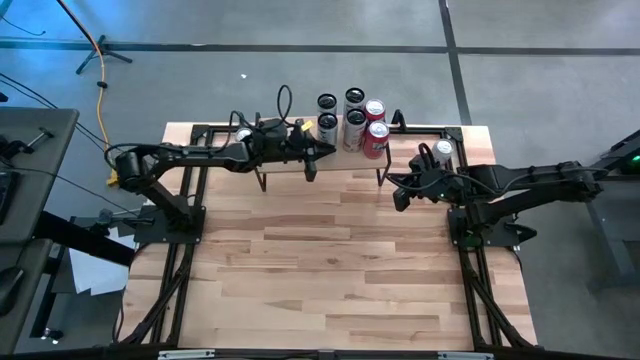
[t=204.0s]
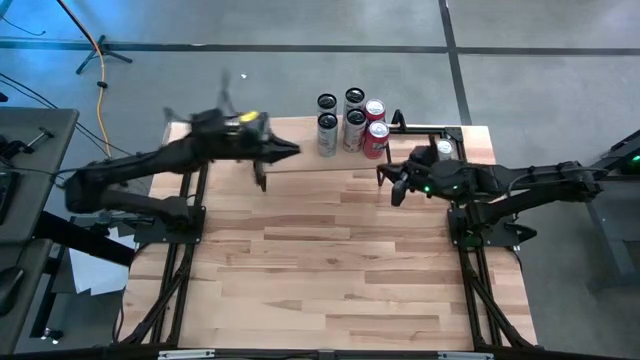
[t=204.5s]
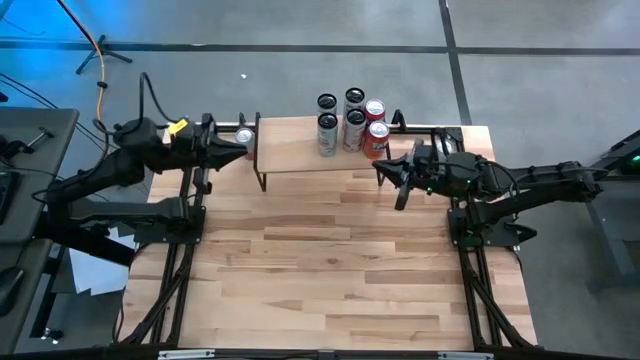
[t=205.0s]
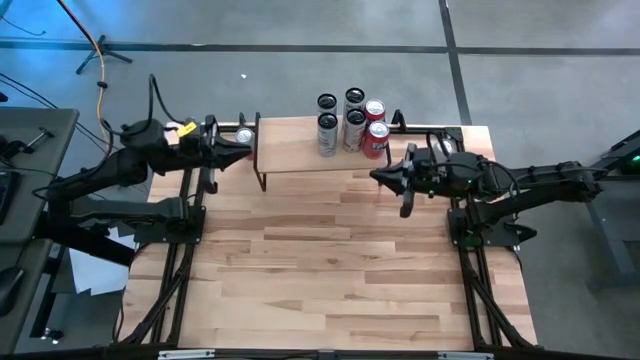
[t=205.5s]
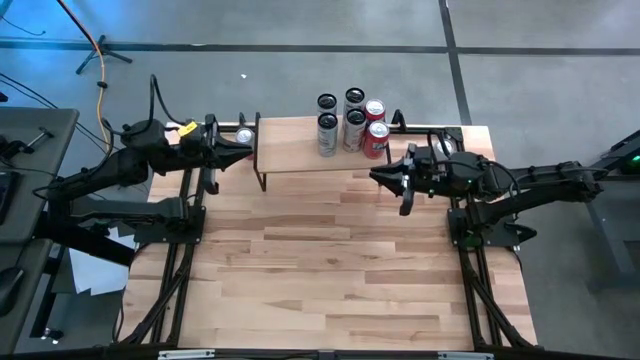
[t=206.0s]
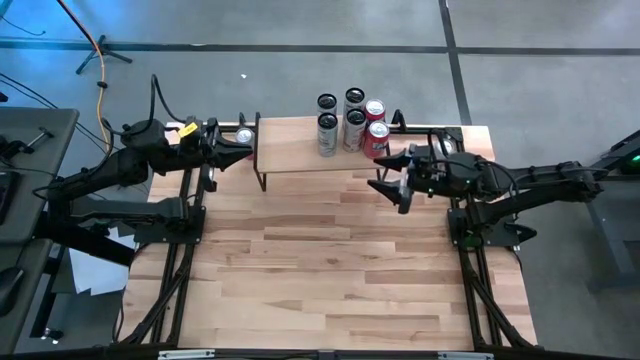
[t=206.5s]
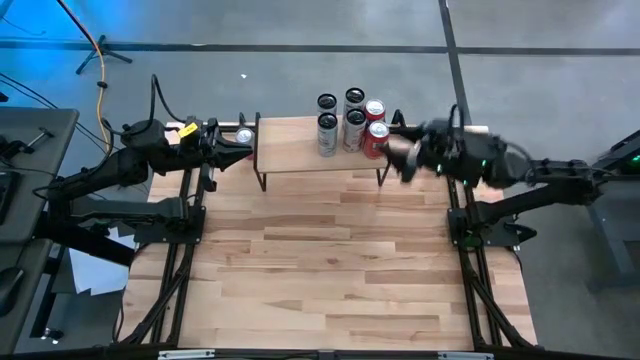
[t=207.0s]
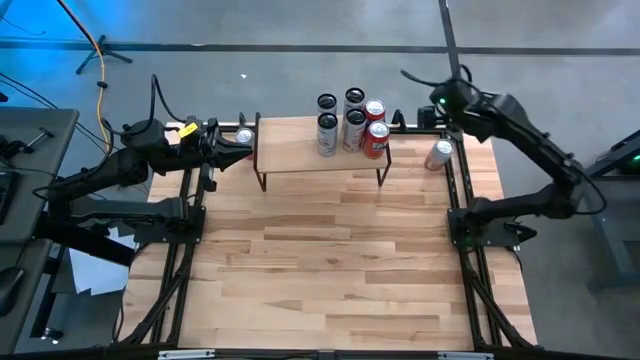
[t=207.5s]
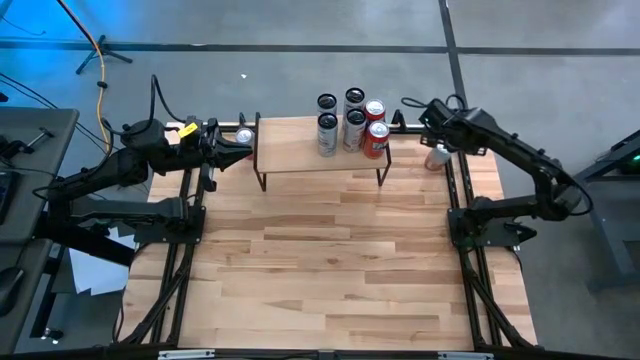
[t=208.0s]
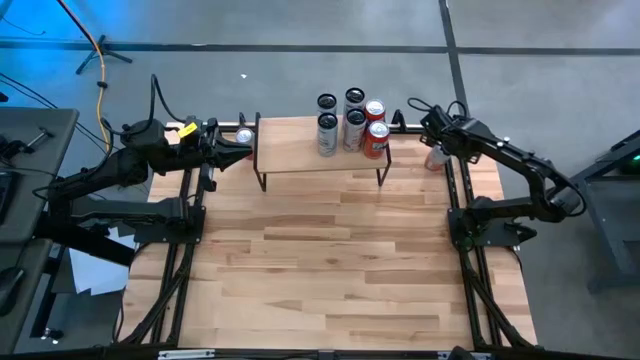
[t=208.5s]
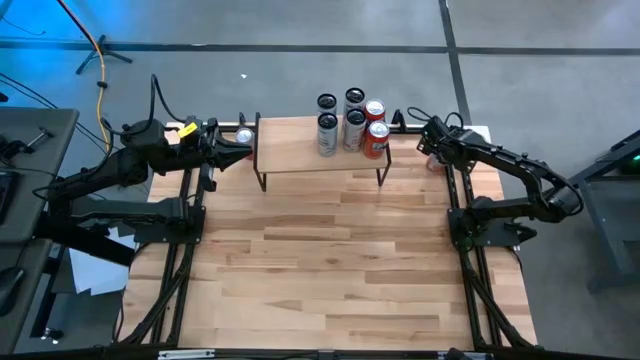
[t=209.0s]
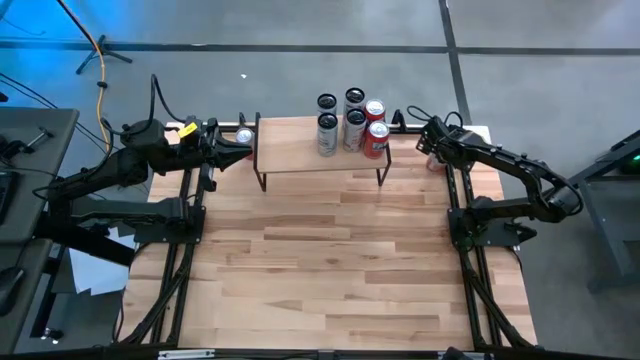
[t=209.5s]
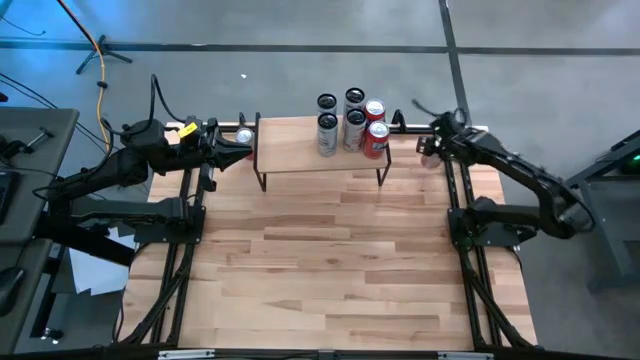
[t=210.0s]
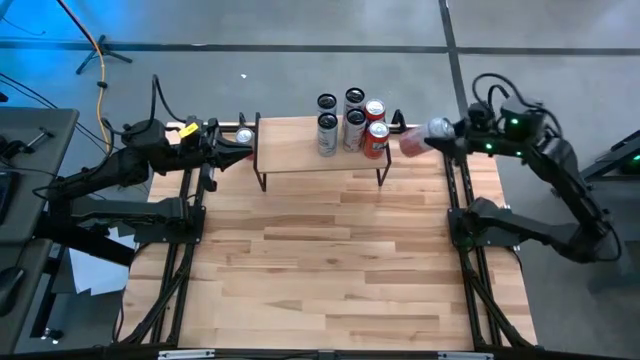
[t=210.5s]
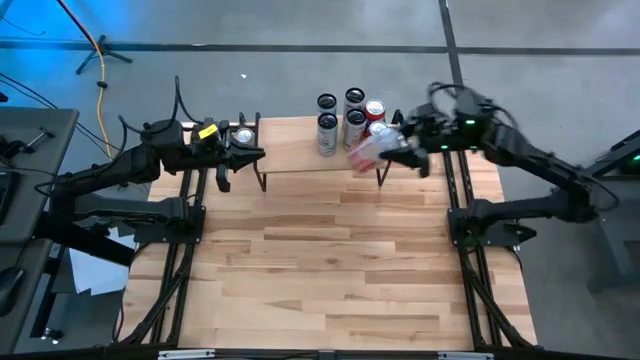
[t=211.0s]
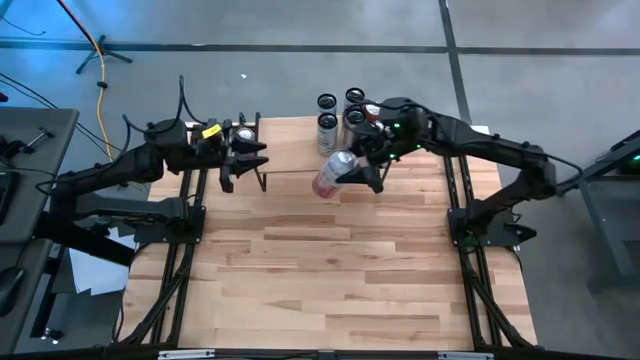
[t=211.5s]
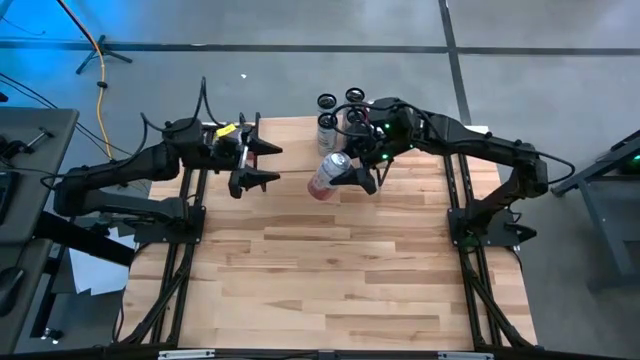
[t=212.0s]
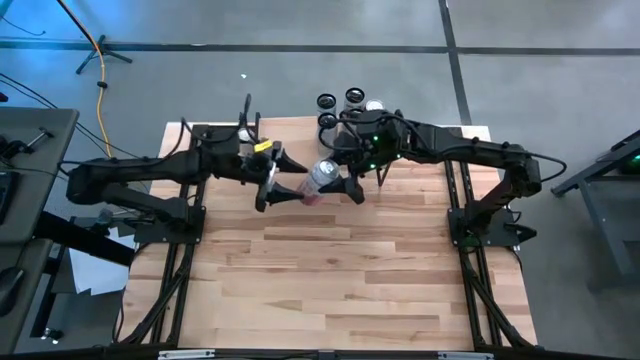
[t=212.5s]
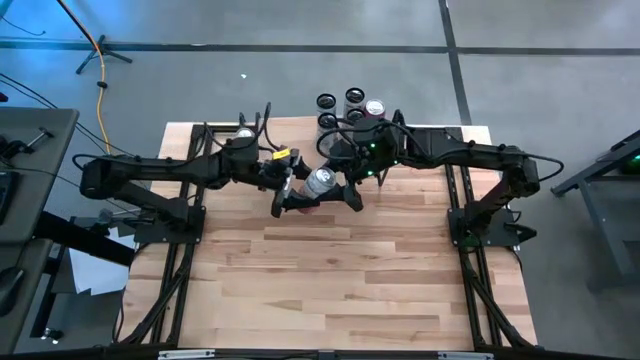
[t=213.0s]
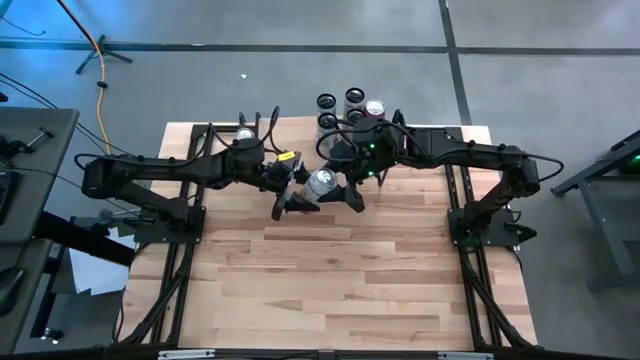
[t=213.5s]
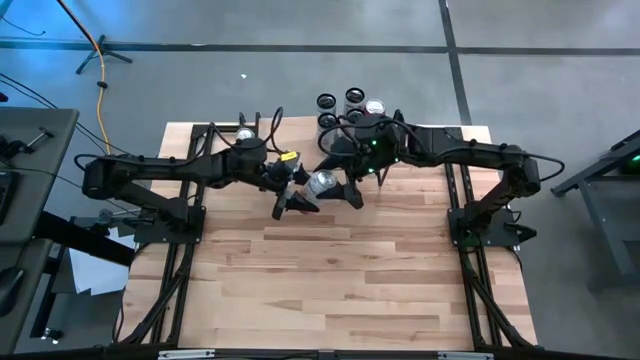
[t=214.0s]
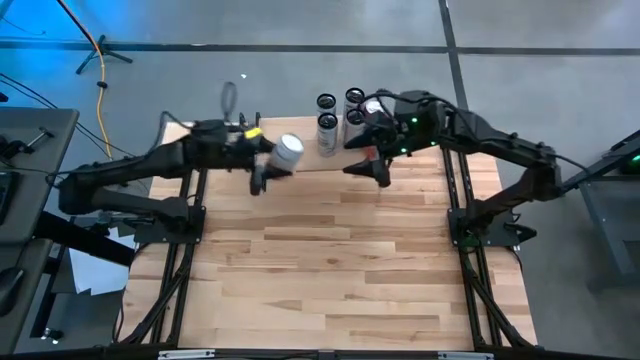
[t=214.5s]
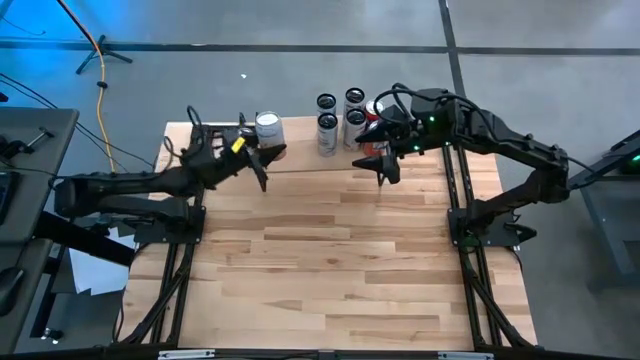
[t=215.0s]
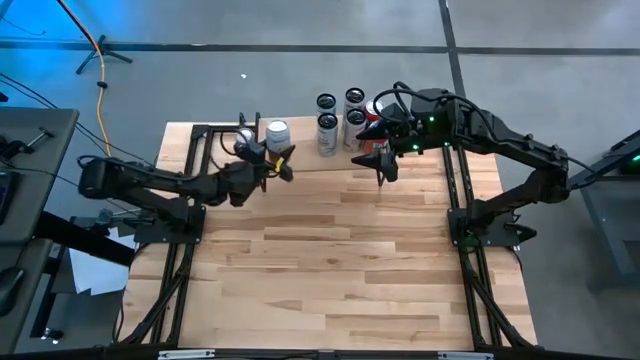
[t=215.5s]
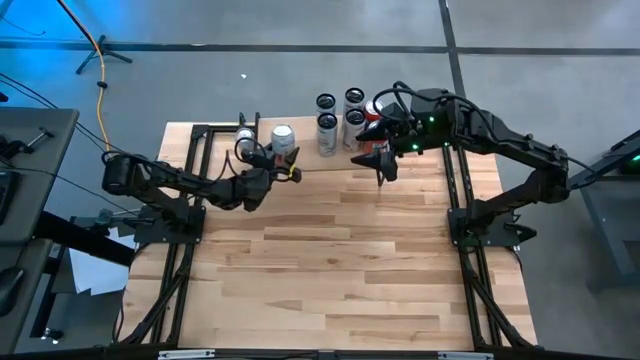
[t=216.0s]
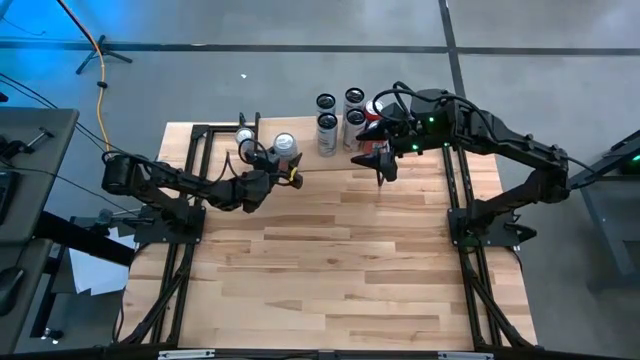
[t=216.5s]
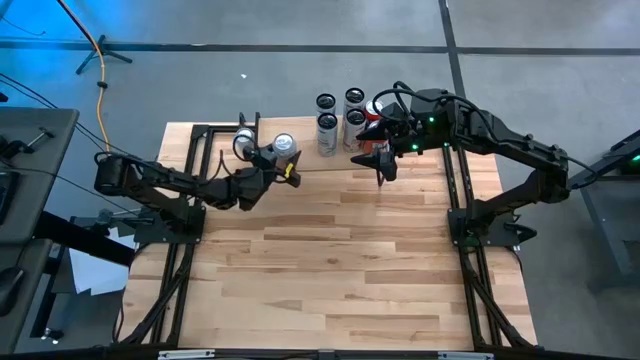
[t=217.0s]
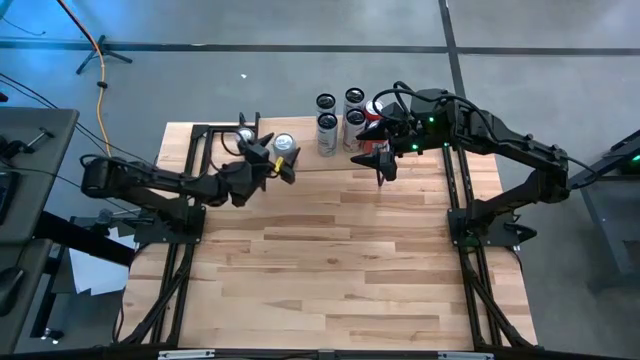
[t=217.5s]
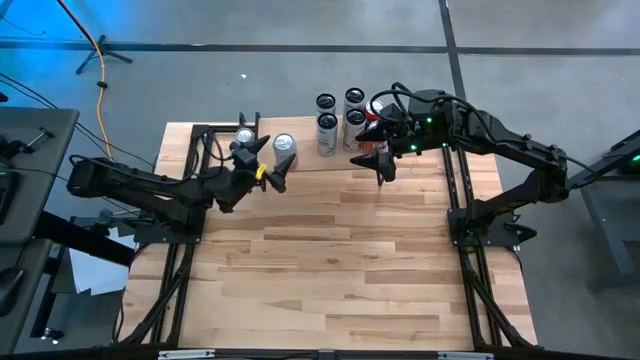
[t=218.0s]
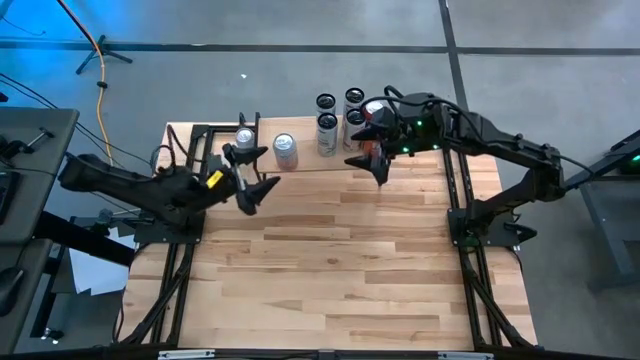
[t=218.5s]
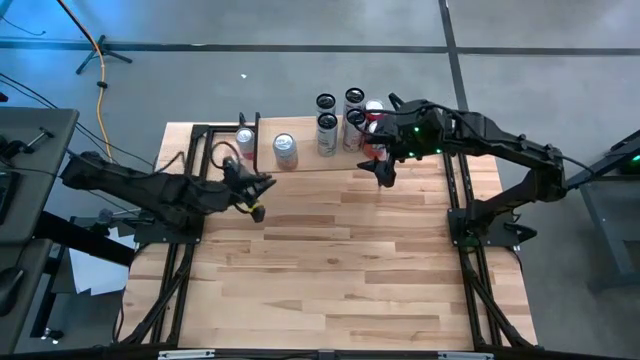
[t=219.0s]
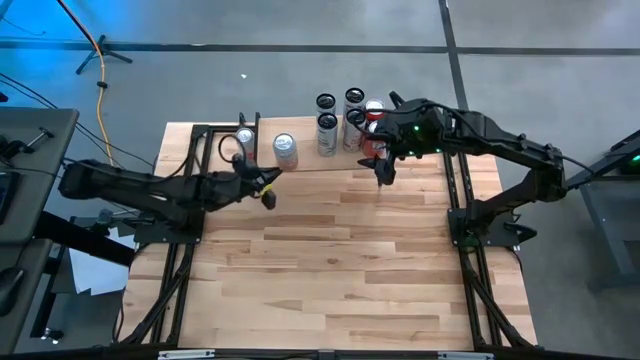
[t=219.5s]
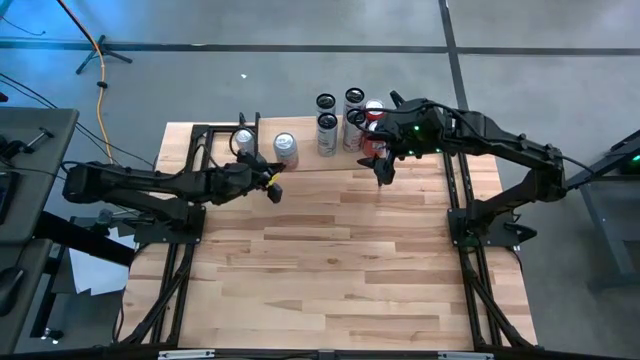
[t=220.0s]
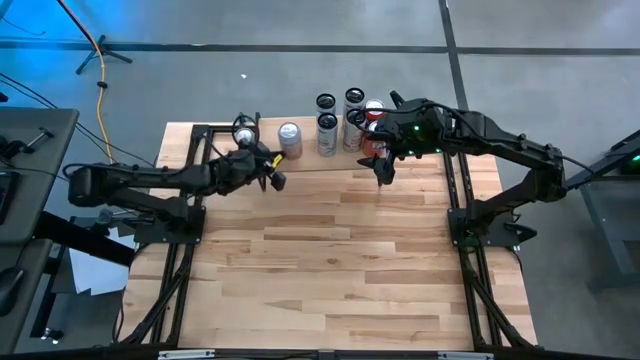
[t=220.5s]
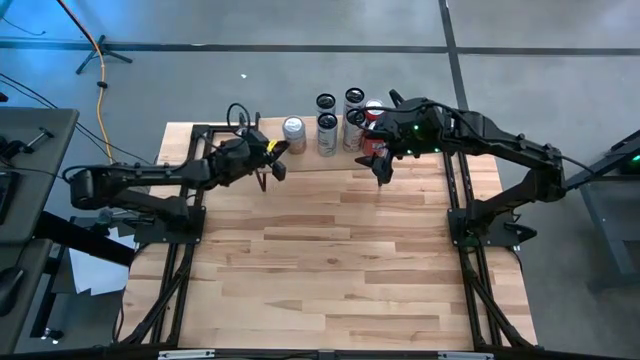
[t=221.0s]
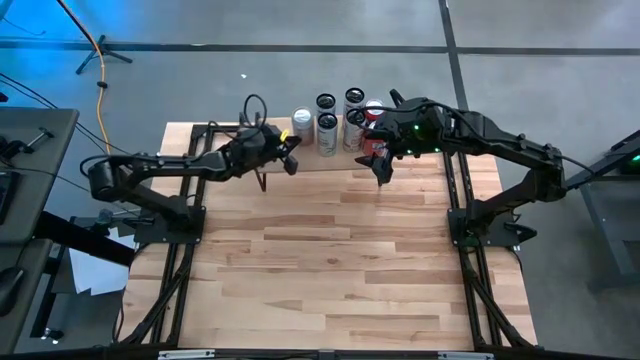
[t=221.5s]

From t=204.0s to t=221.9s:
Task: Place canned beverage on shelf
Put the right silver soda can on the shelf

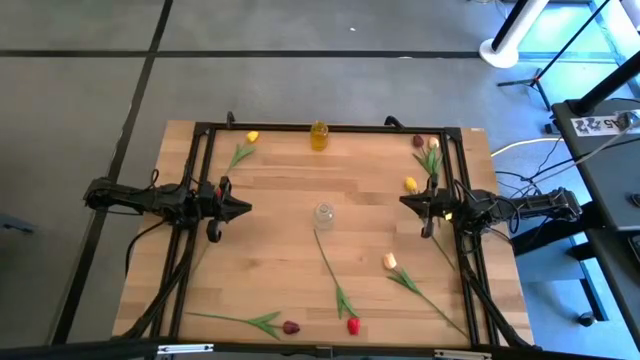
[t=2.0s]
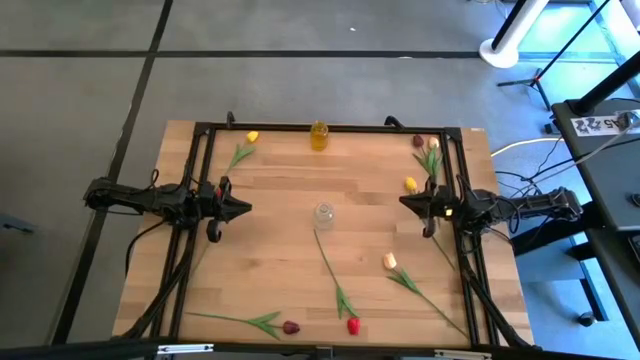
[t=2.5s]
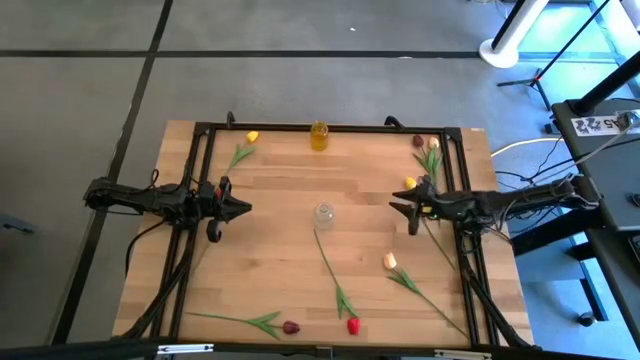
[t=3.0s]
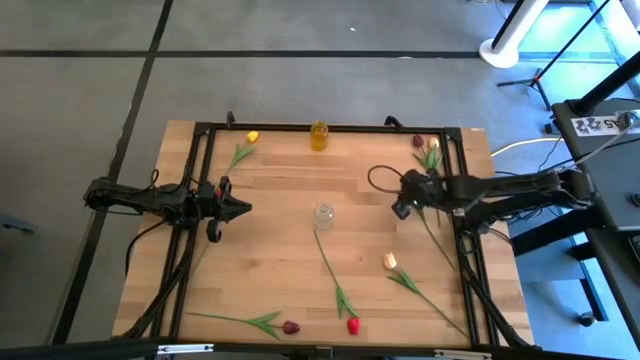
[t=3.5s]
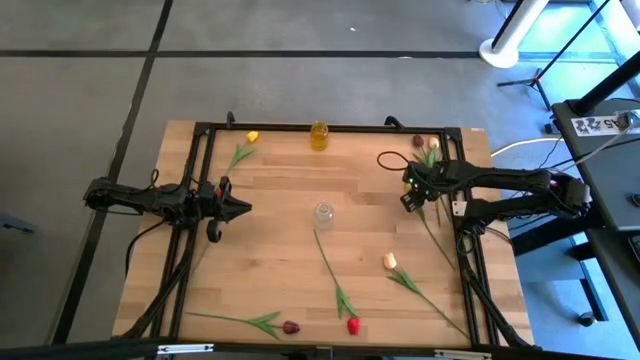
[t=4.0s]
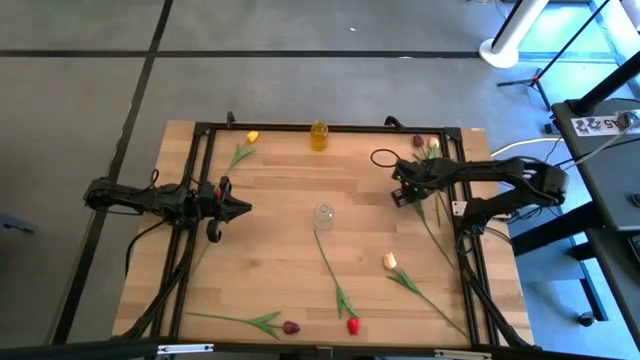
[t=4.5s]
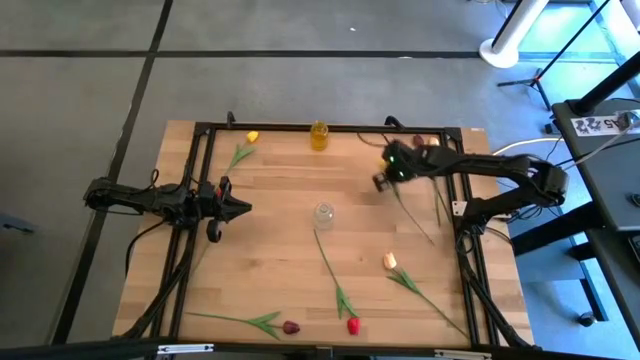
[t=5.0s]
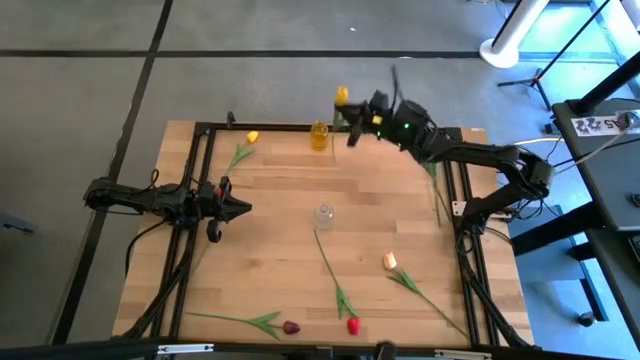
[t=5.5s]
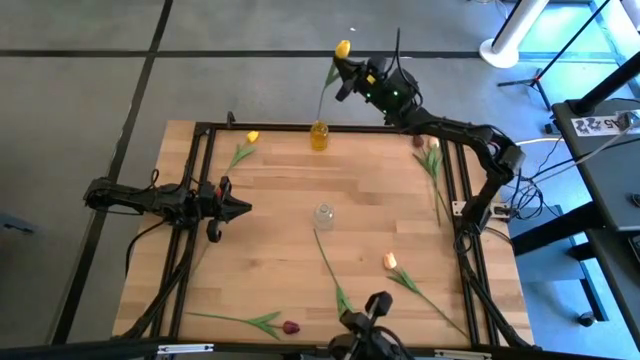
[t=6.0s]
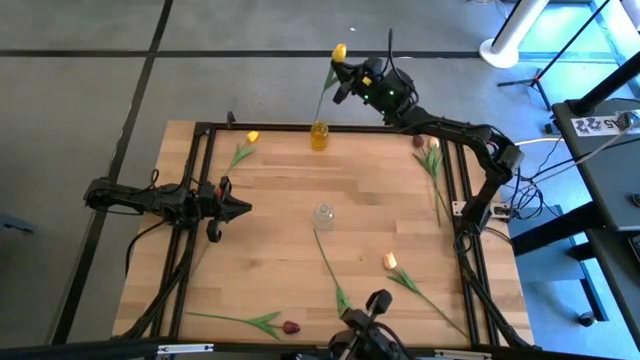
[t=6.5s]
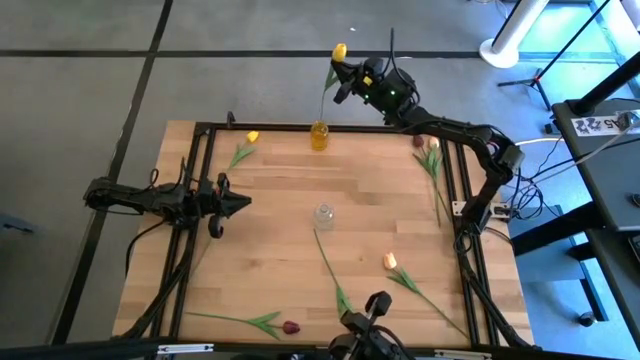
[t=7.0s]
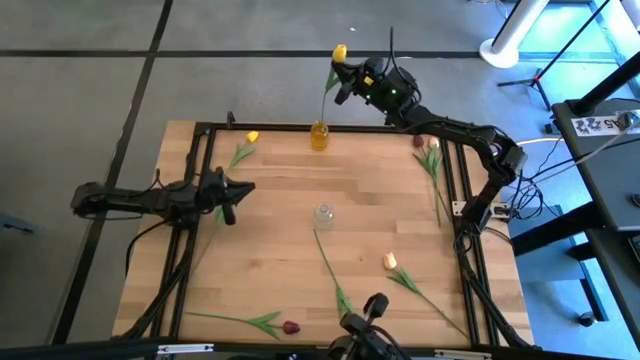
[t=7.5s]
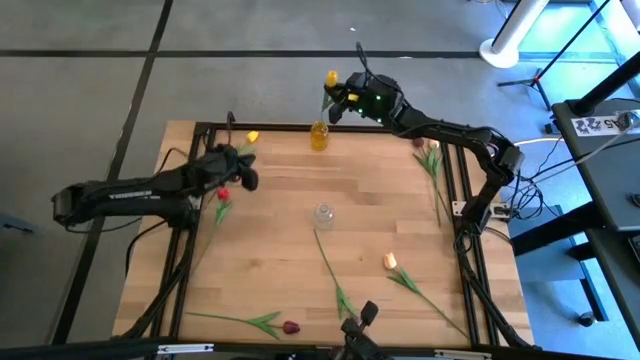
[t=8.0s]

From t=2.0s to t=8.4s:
Task: Sort flowers into vase by color
Put the bottom yellow tulip into the yellow vase
